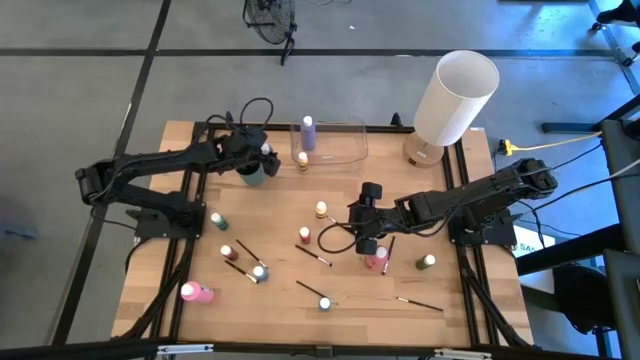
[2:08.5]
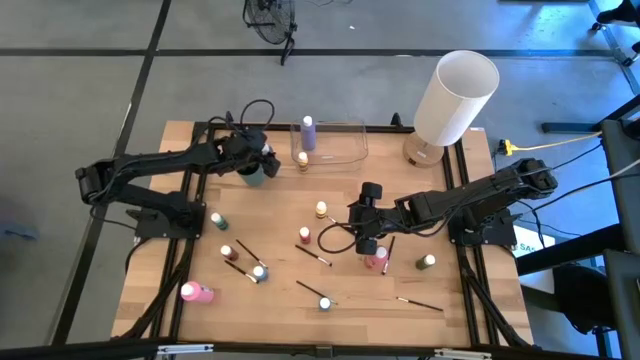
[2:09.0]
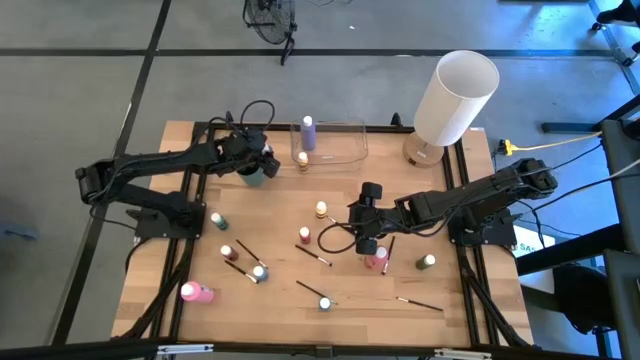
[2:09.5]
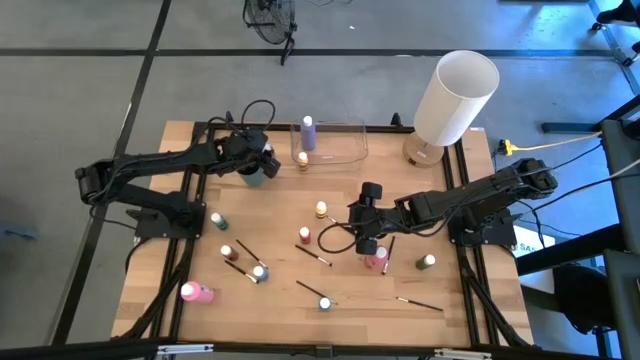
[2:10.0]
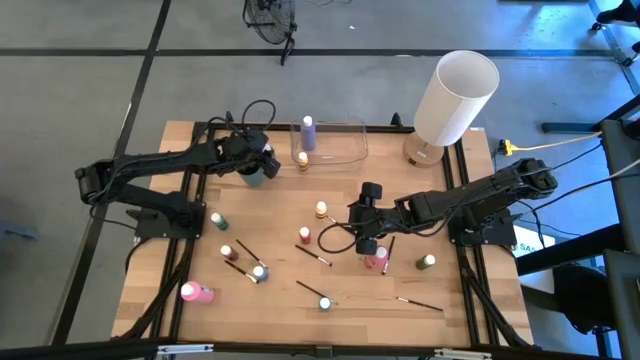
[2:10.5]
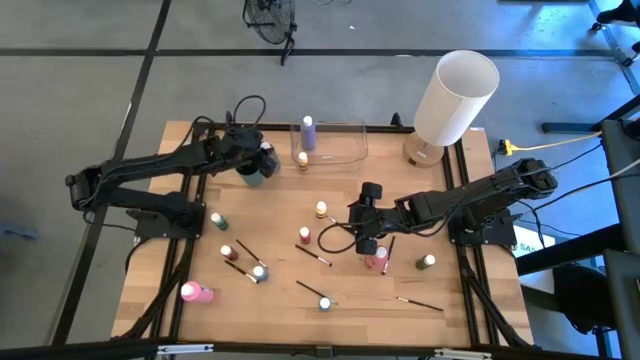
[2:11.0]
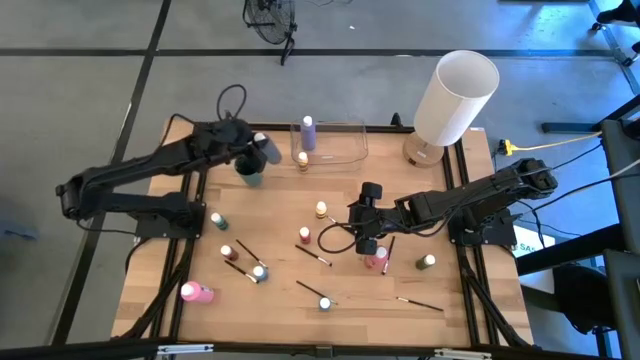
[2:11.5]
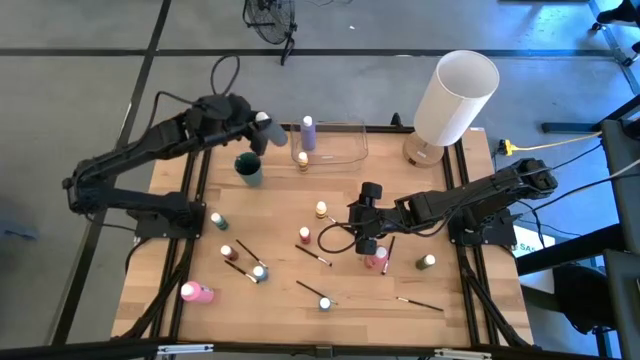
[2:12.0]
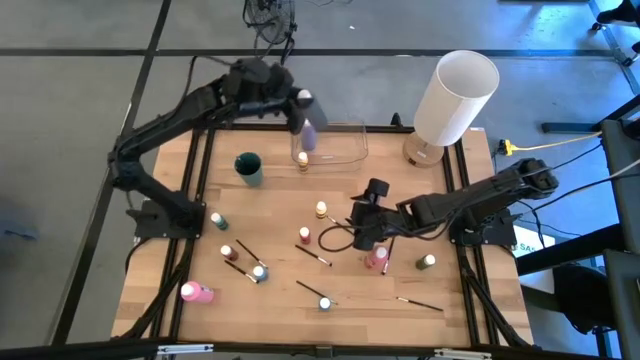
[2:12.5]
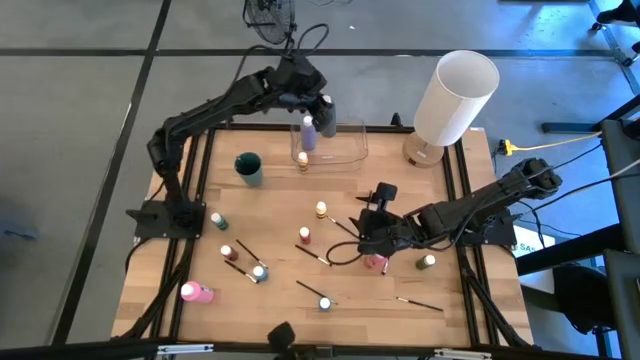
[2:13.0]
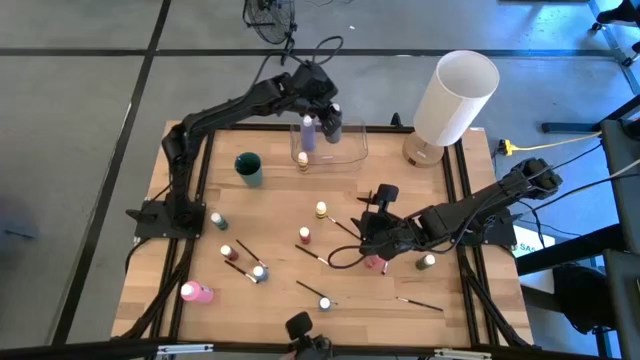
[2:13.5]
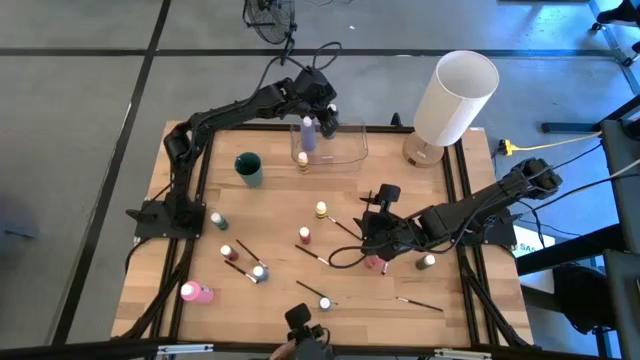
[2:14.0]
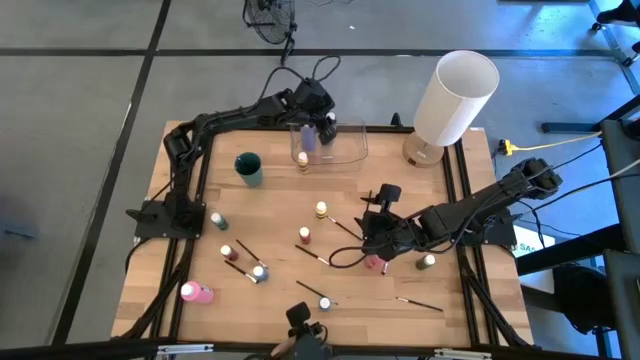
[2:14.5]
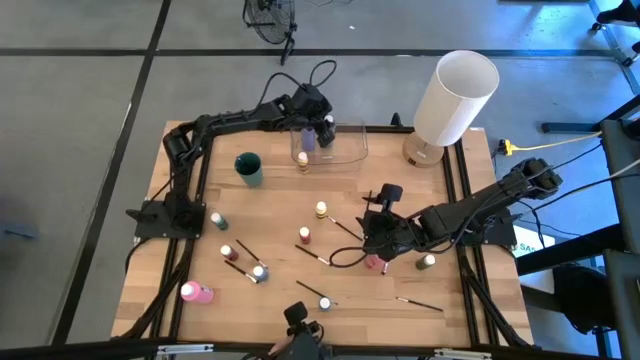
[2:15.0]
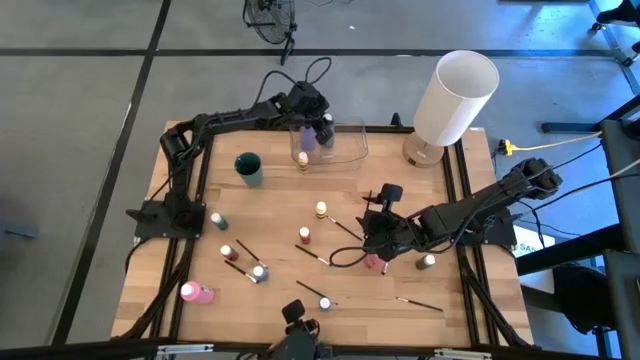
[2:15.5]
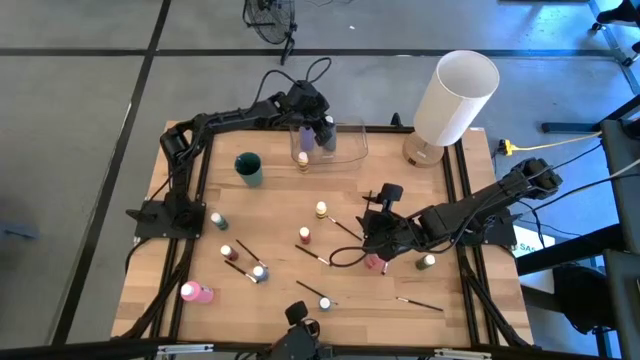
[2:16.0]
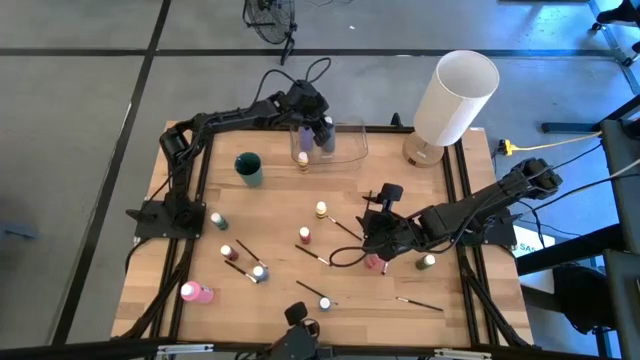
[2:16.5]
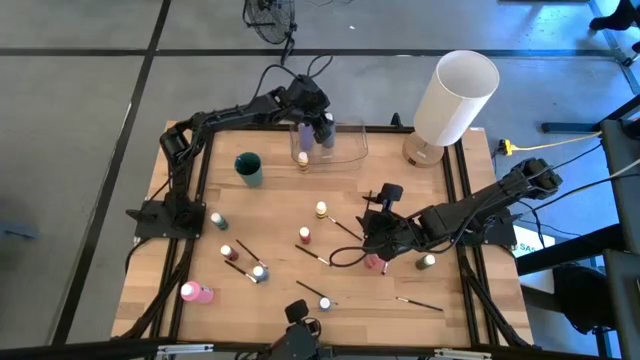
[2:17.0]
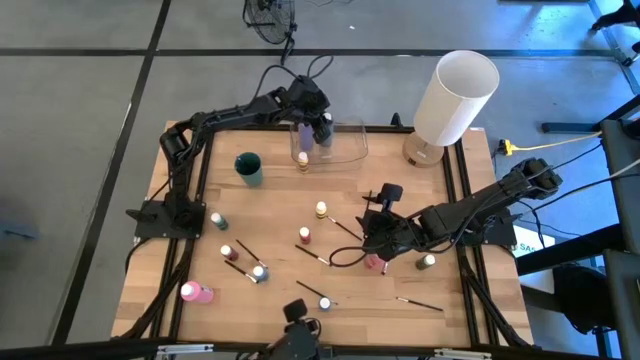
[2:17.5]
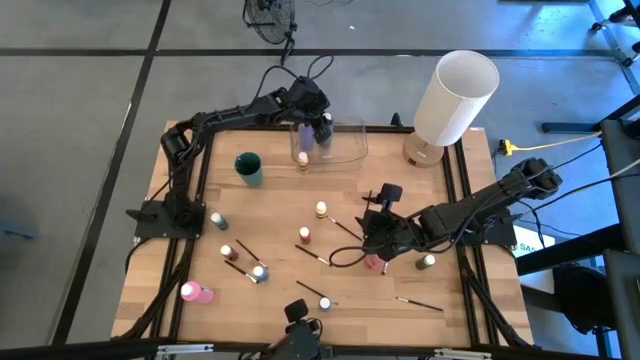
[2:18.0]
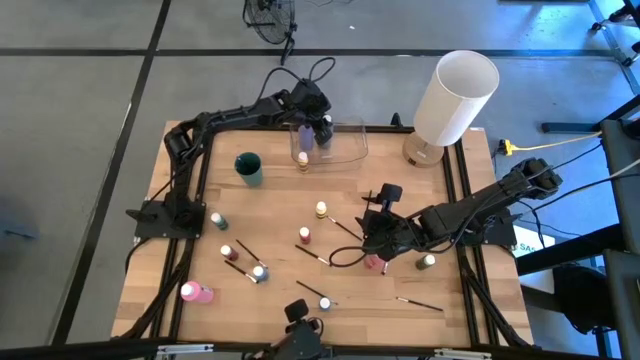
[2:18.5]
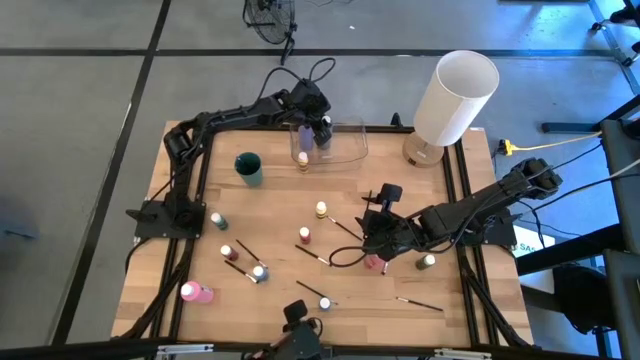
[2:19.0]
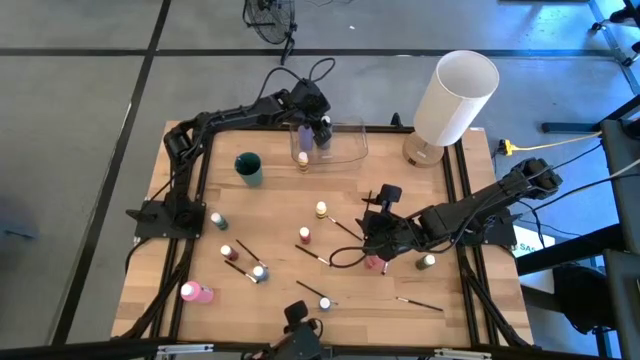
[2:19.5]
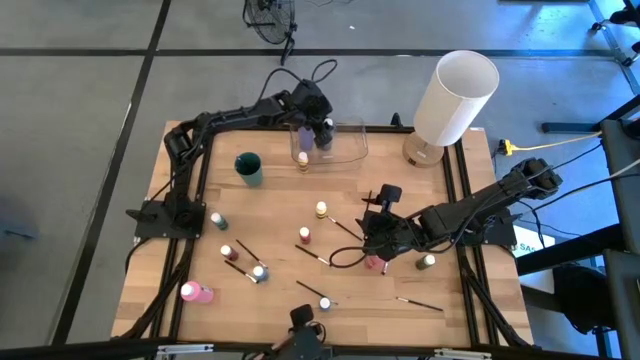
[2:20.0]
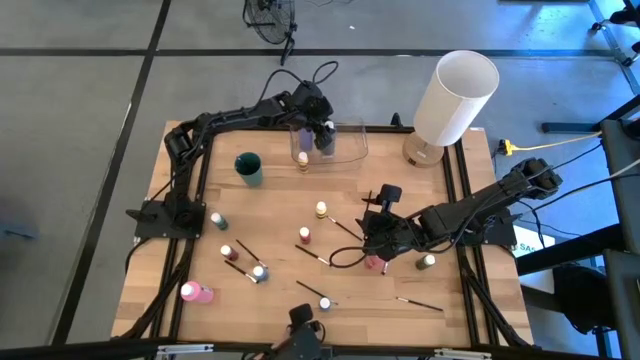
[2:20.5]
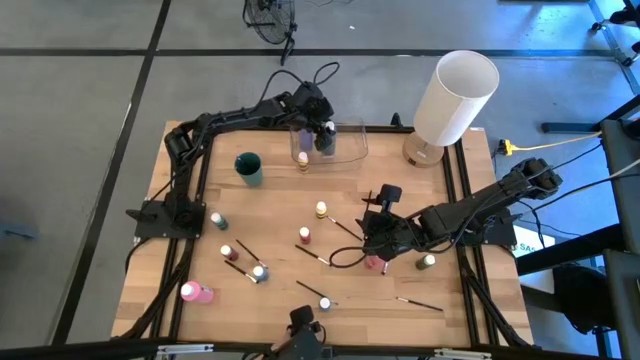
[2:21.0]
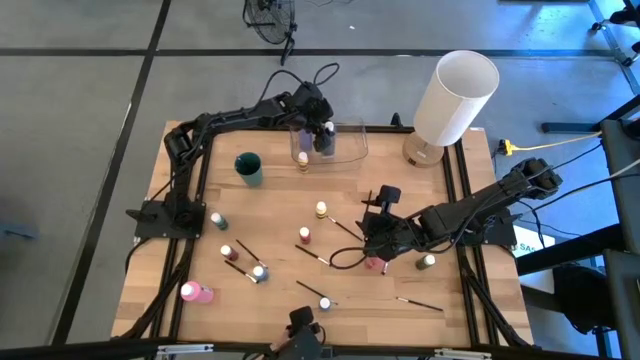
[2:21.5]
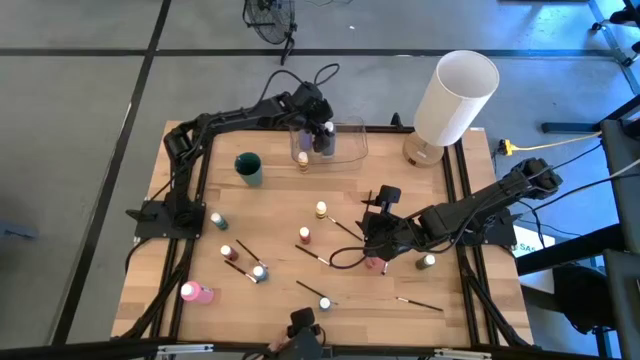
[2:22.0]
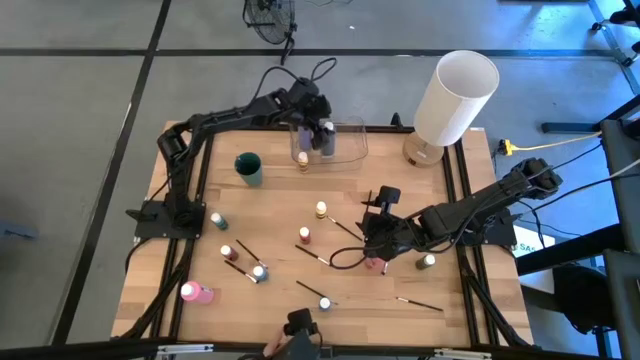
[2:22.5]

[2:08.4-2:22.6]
Task: Pick & Place Paint Supplies
Put the gray paint bottle into the transparent bin

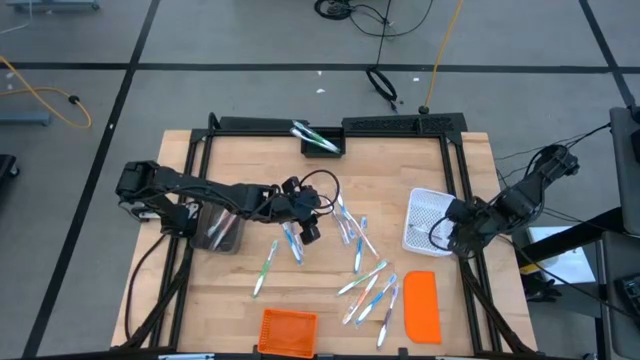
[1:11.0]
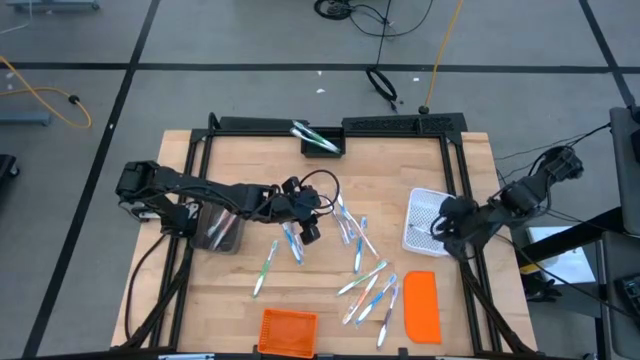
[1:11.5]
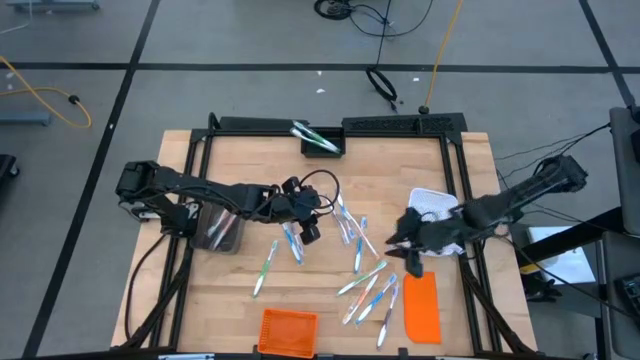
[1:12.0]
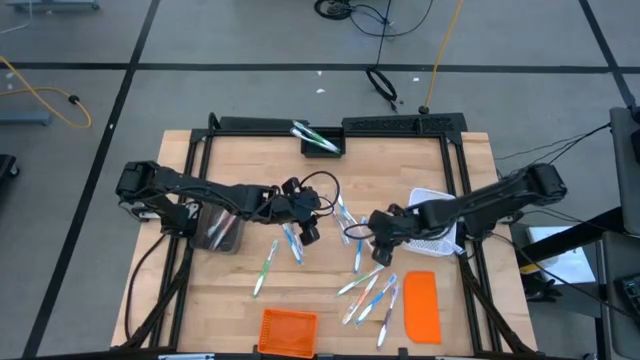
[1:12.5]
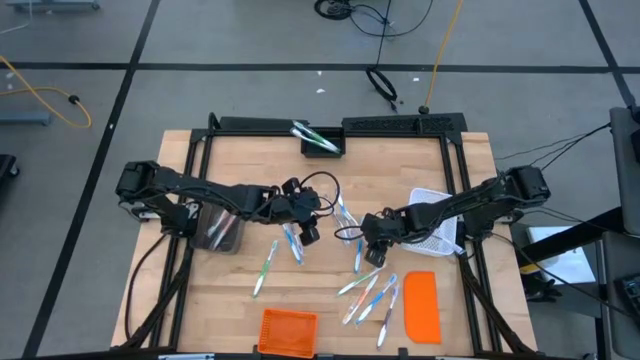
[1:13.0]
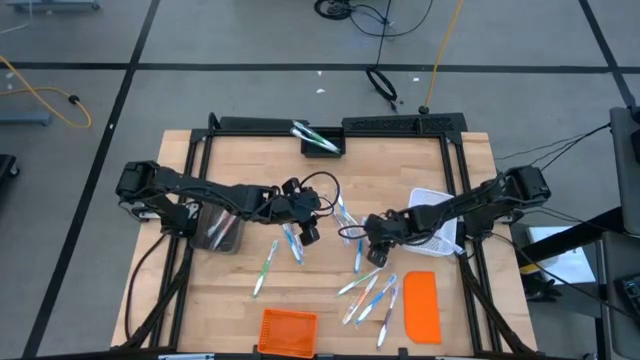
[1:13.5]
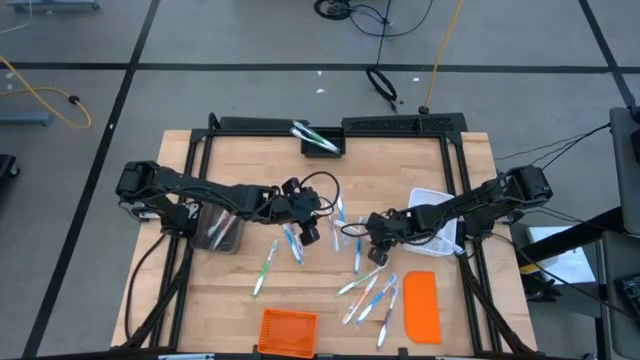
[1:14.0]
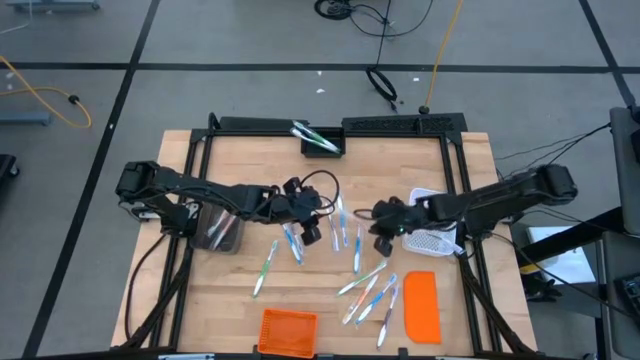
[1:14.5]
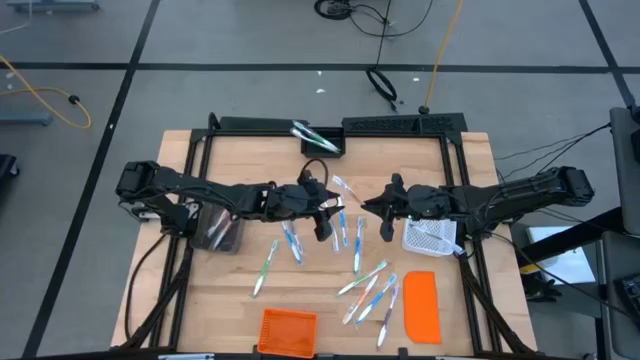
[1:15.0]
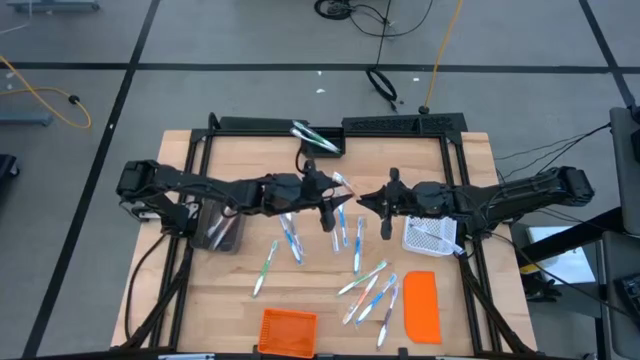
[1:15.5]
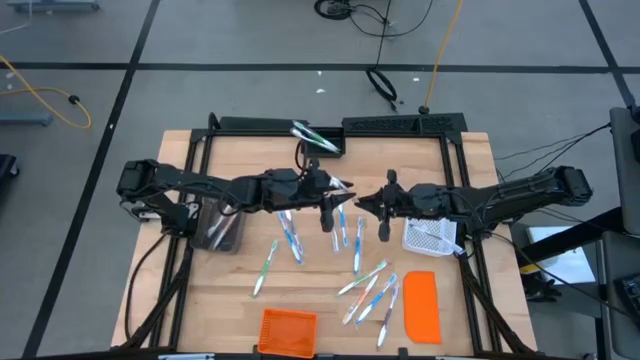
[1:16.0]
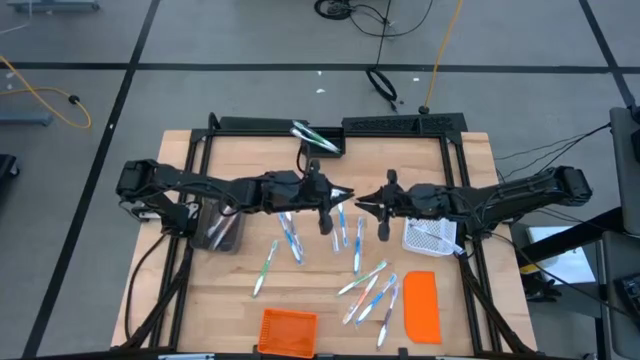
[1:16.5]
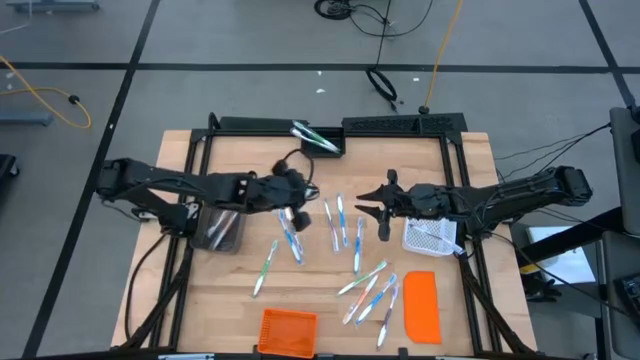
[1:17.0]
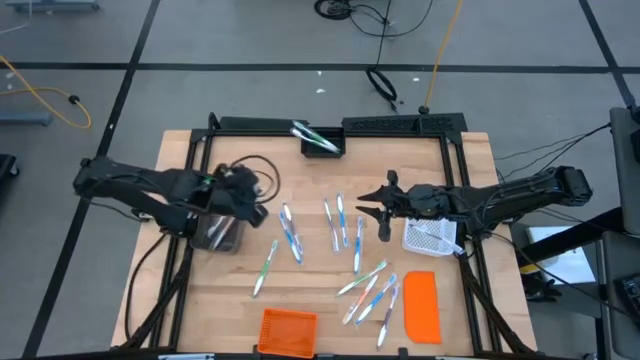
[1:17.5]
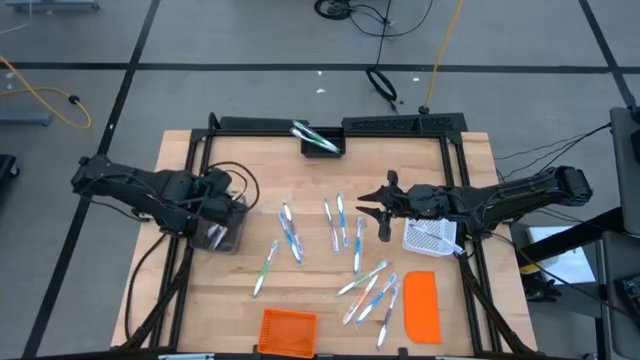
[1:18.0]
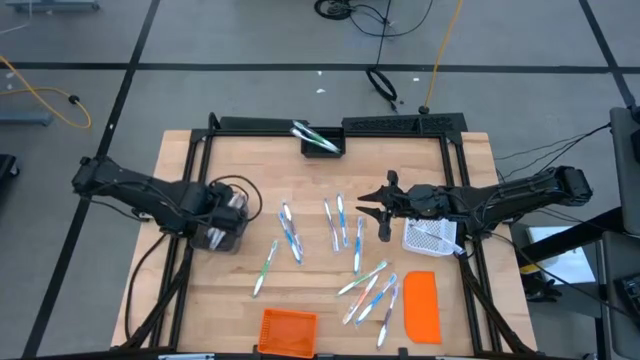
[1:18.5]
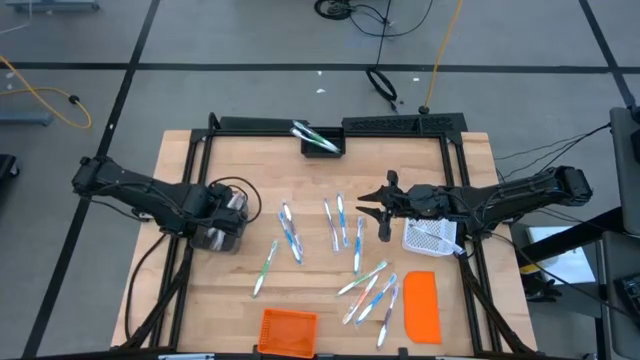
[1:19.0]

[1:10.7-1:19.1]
Task: Pick & Place Toothbrushes
Put the orange toothbrush into the transparent black bin
